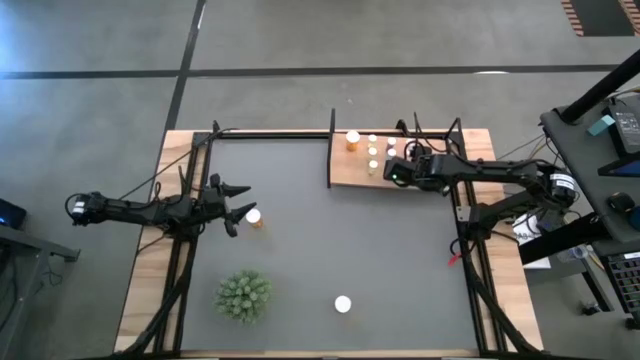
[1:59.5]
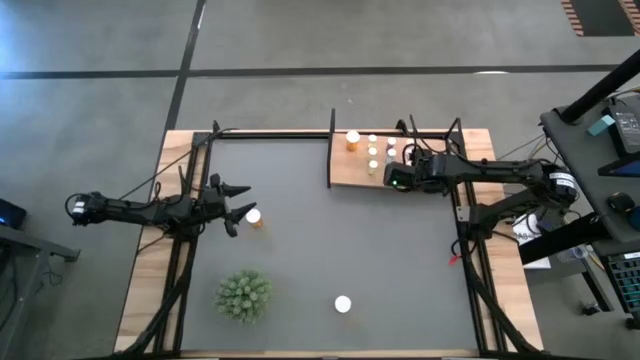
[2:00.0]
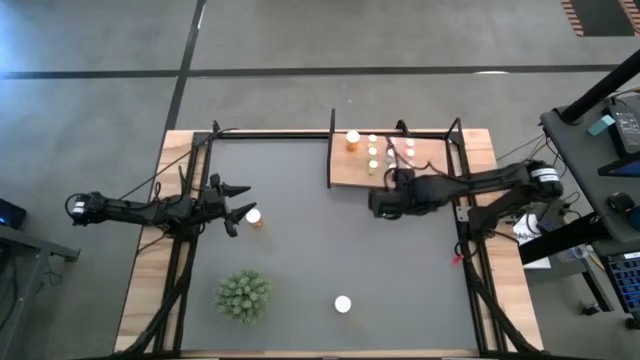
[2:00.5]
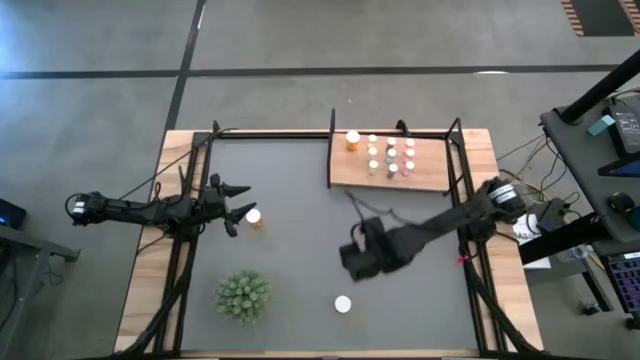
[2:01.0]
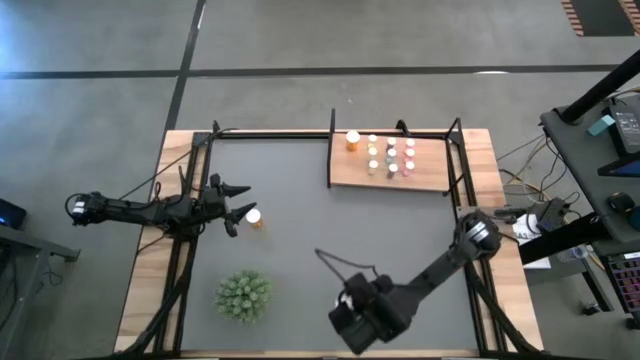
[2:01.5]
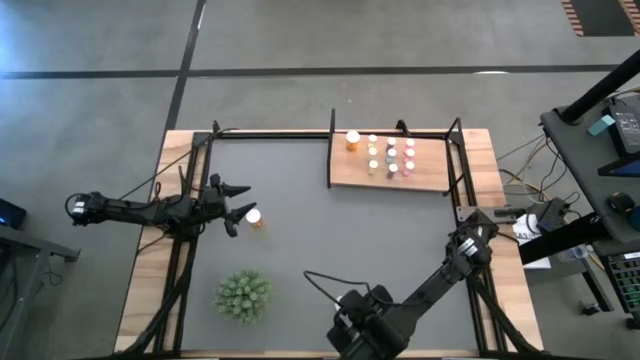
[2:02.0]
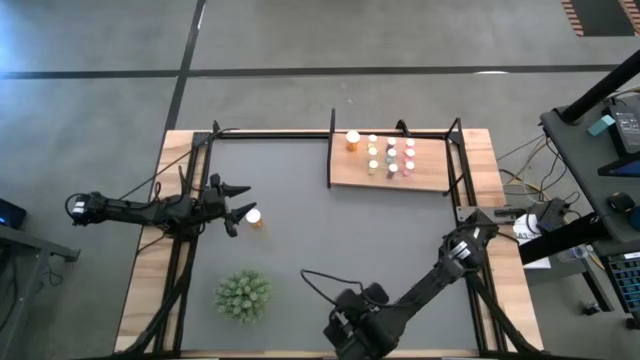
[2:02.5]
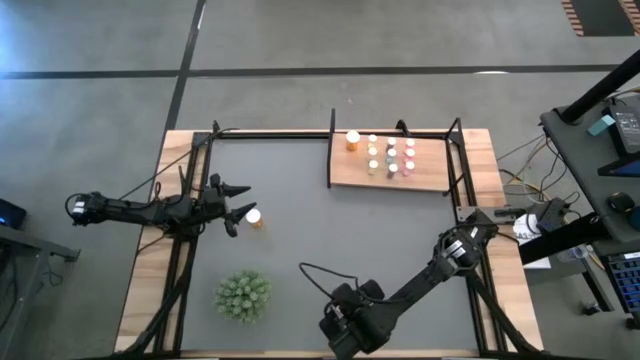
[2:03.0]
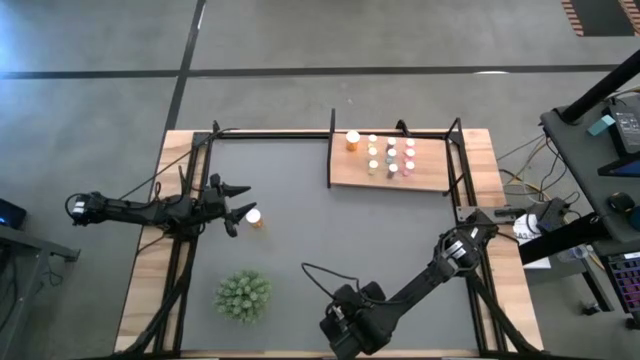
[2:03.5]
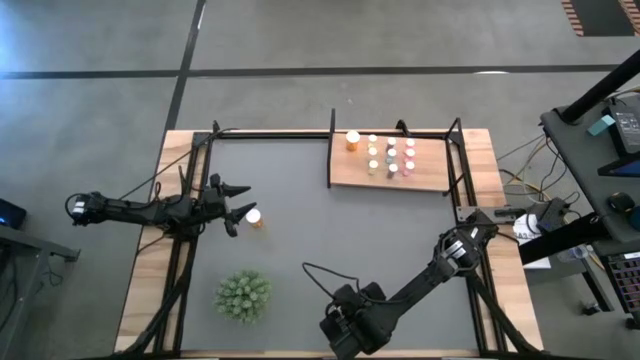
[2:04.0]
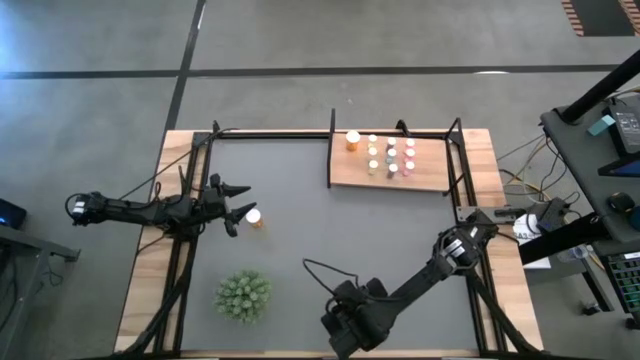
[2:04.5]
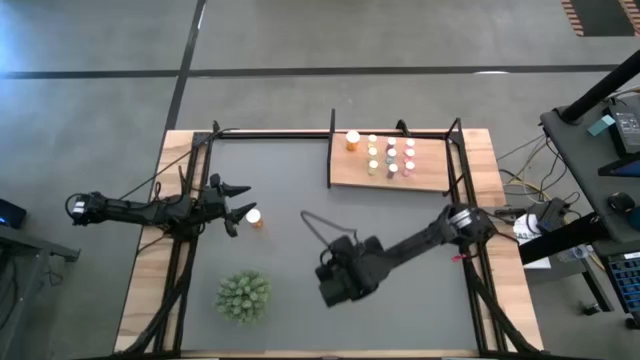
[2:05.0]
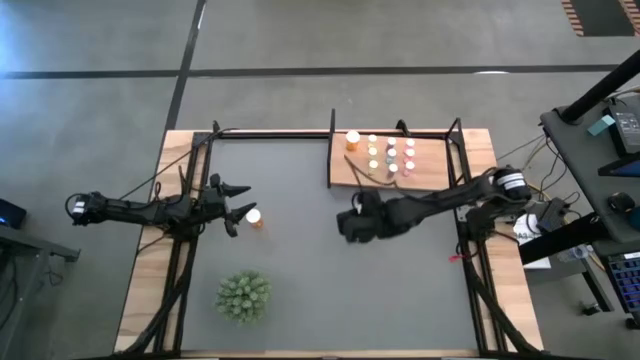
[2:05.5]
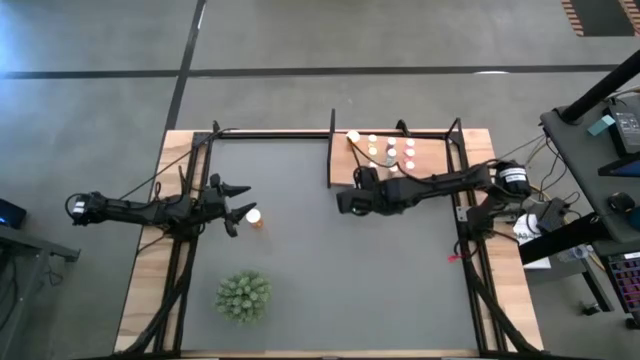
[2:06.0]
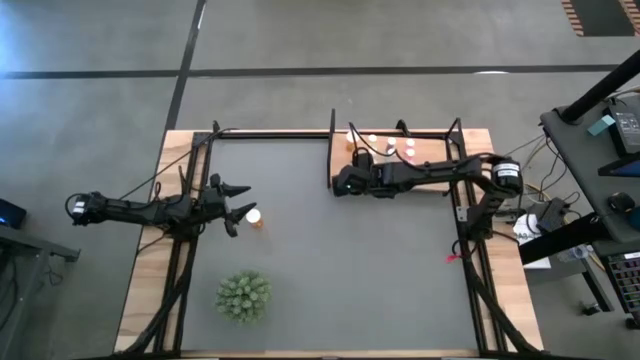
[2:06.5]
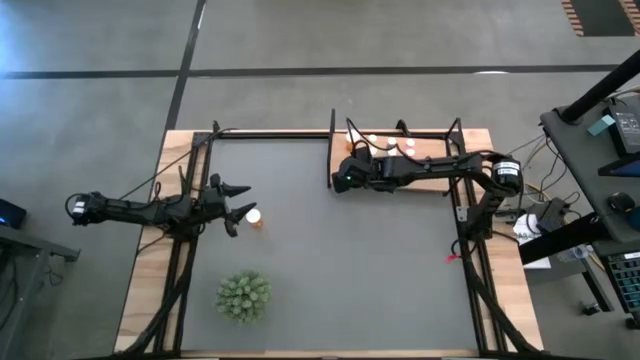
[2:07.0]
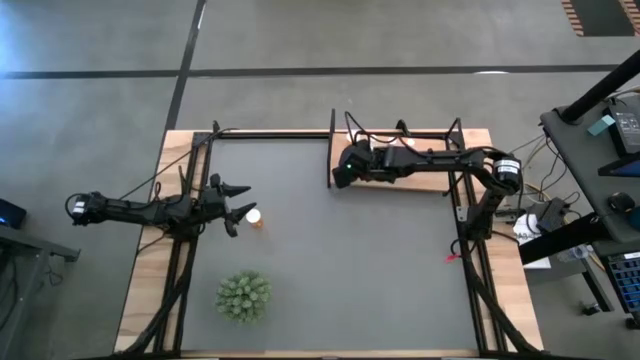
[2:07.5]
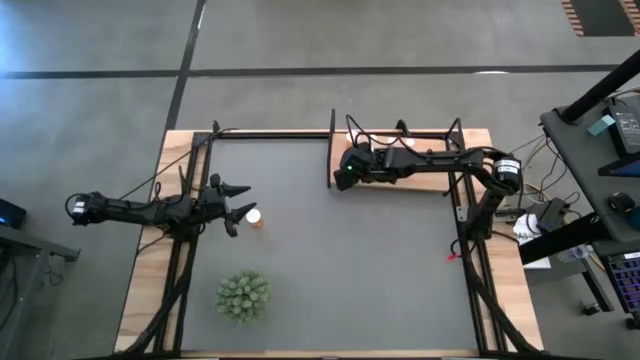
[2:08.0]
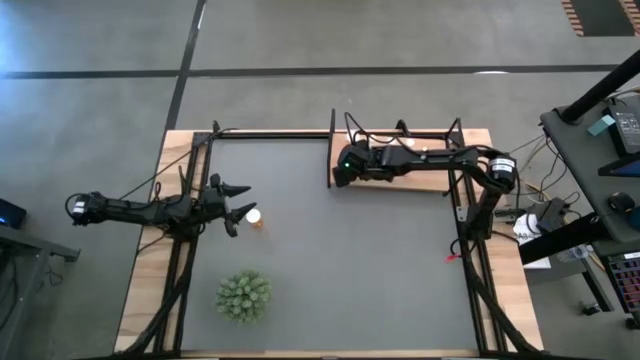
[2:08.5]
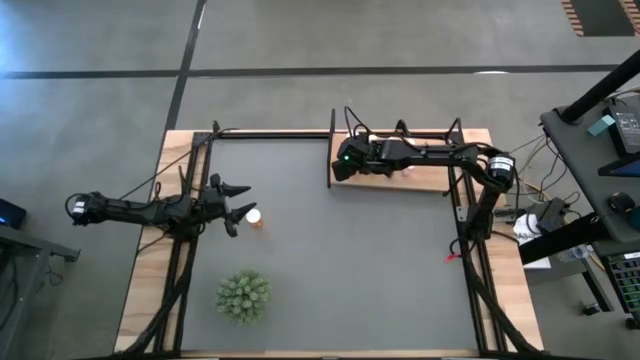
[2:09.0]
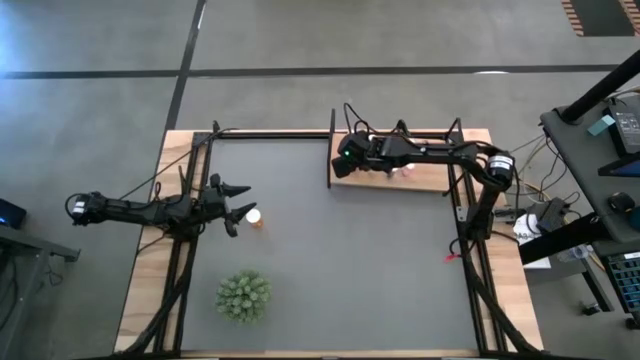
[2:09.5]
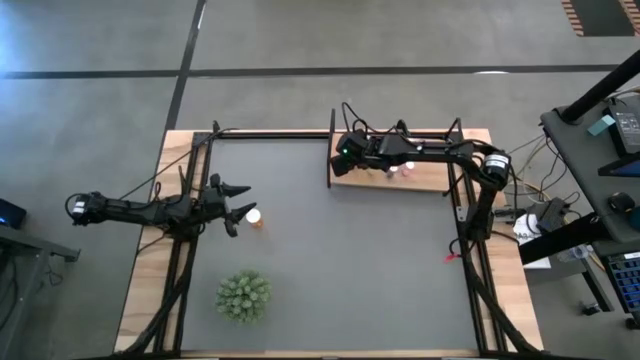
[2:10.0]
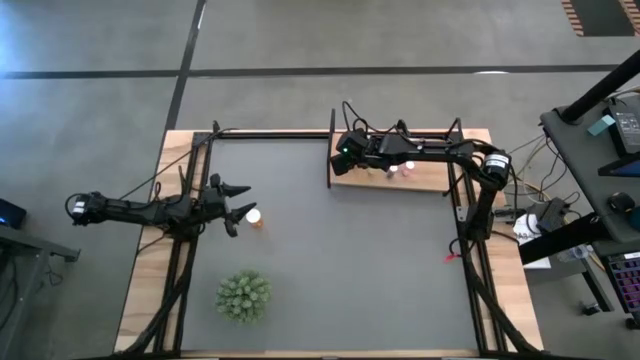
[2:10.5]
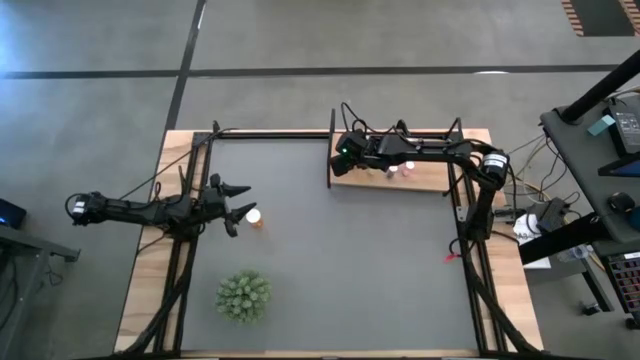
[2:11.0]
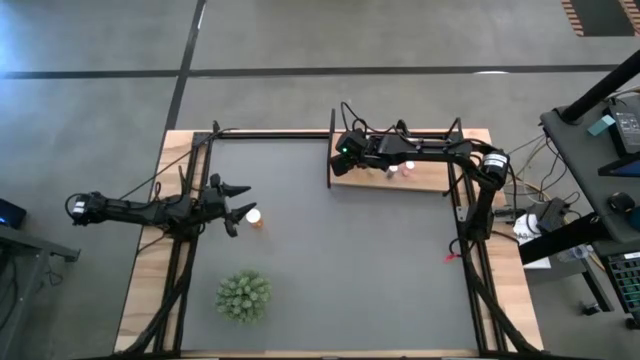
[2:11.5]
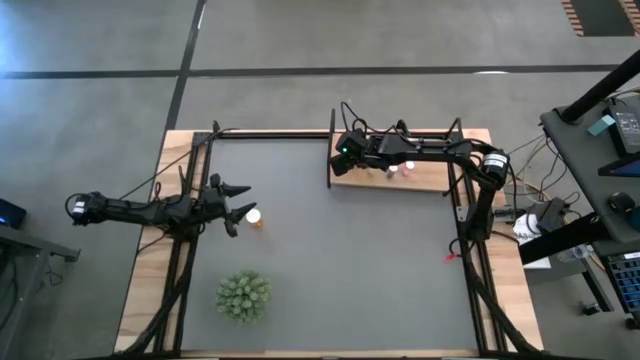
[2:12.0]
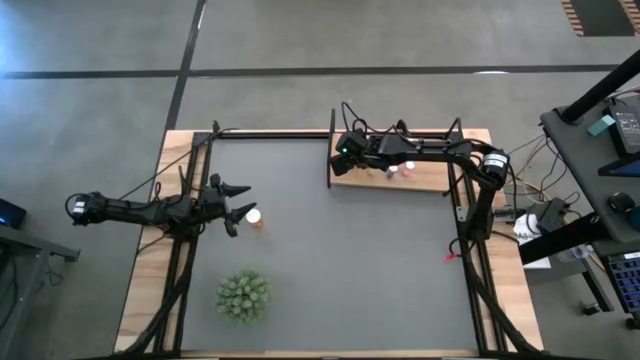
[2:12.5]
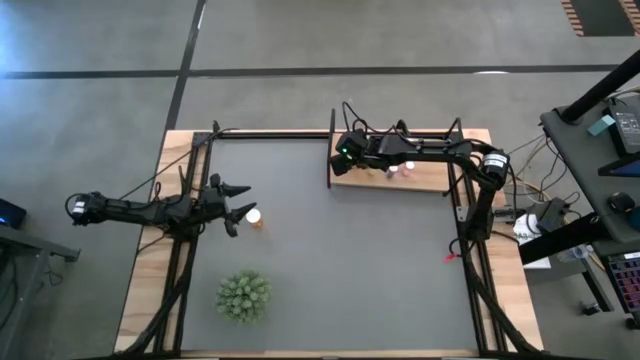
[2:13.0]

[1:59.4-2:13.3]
Task: Pick and place medicine bottles onto shelf by color
Put the bottom orange pill bottle on the shelf aligned with the other orange pill bottle

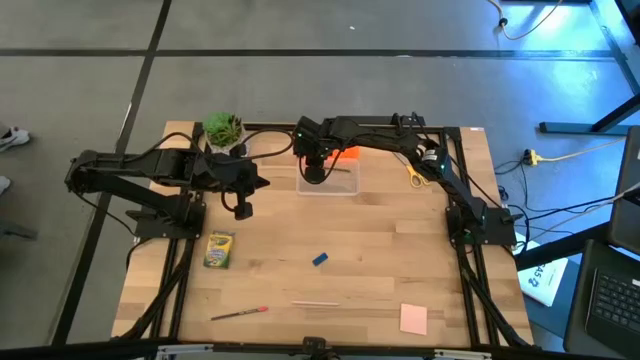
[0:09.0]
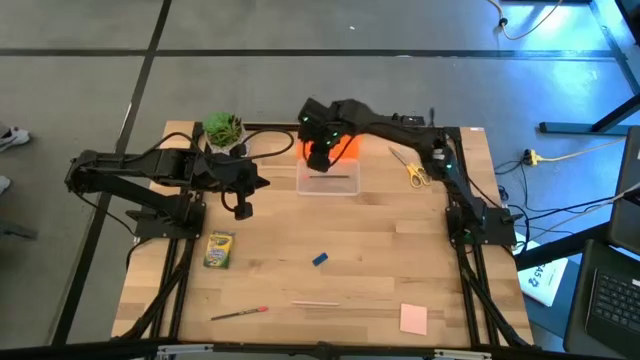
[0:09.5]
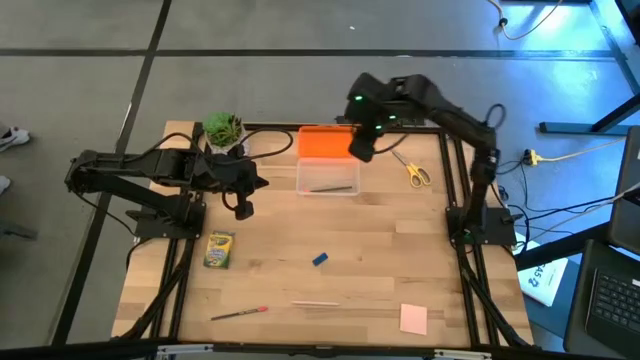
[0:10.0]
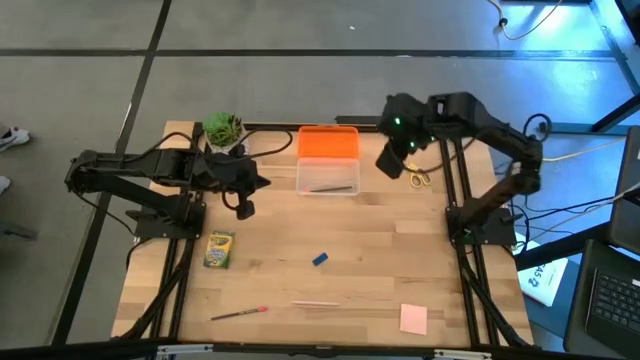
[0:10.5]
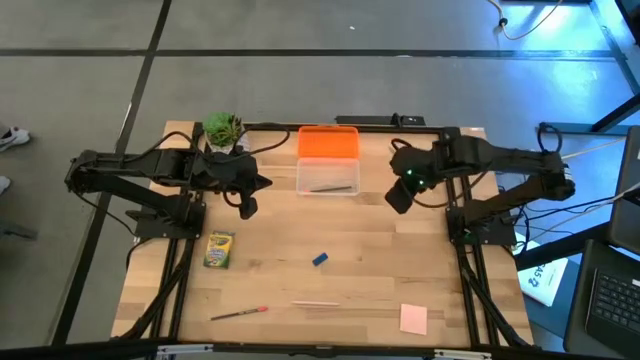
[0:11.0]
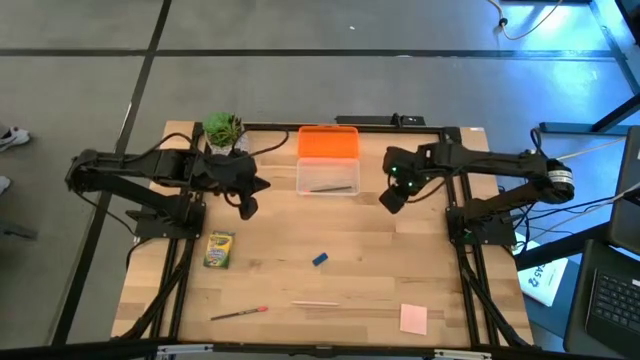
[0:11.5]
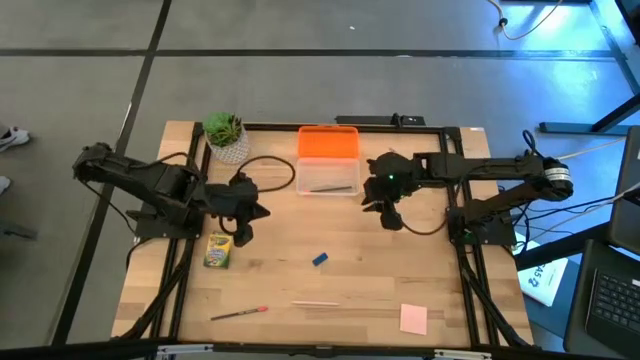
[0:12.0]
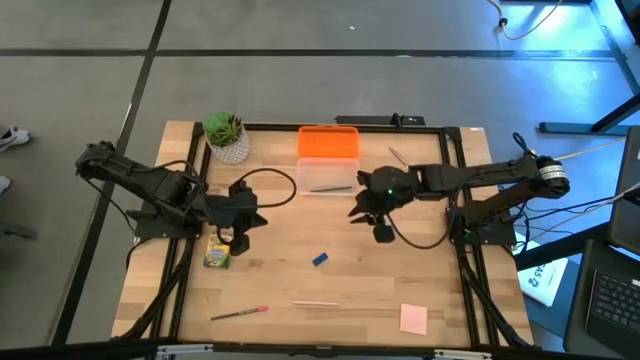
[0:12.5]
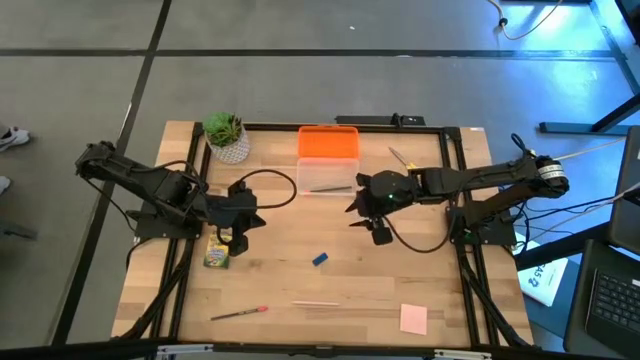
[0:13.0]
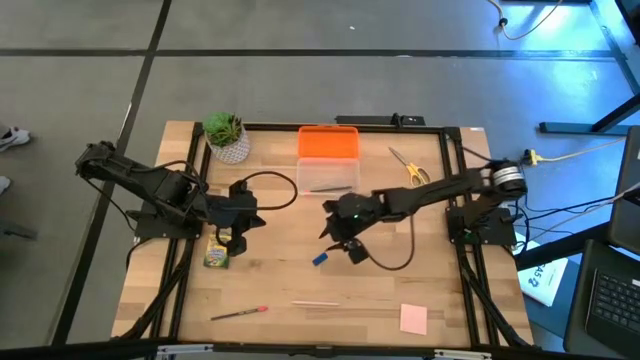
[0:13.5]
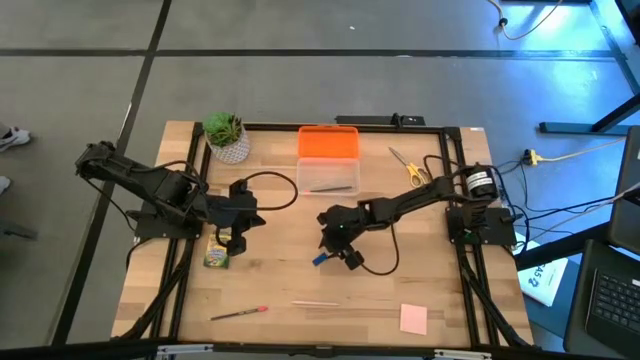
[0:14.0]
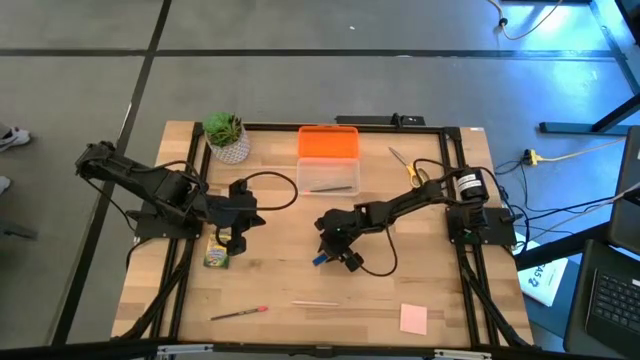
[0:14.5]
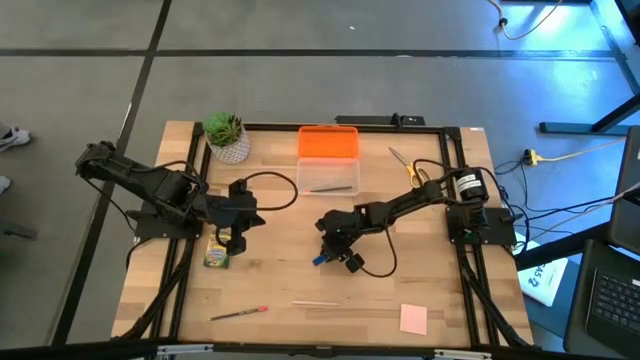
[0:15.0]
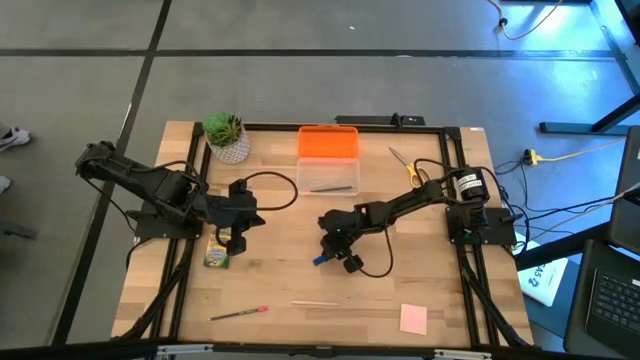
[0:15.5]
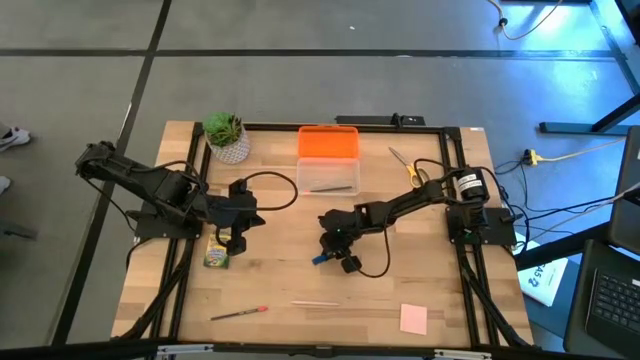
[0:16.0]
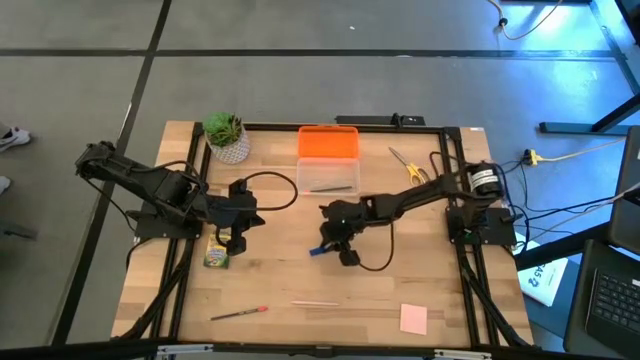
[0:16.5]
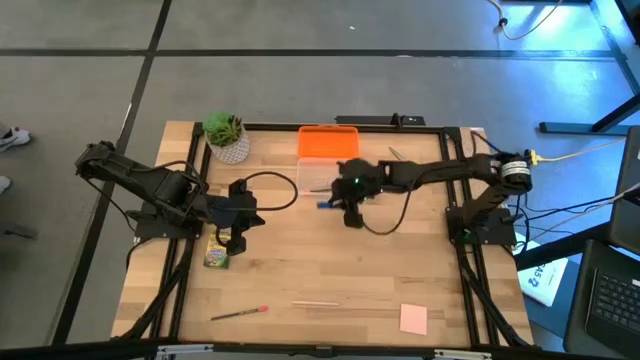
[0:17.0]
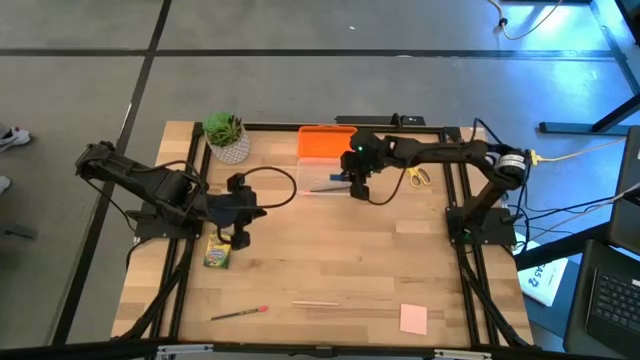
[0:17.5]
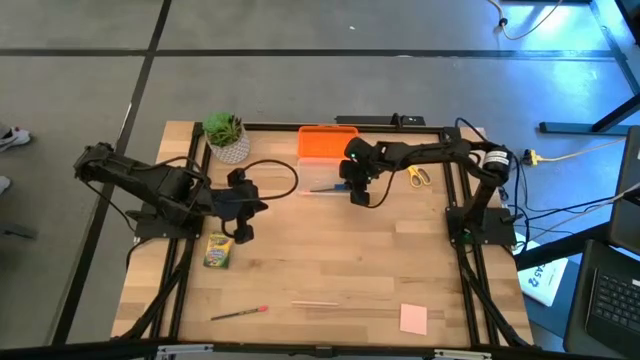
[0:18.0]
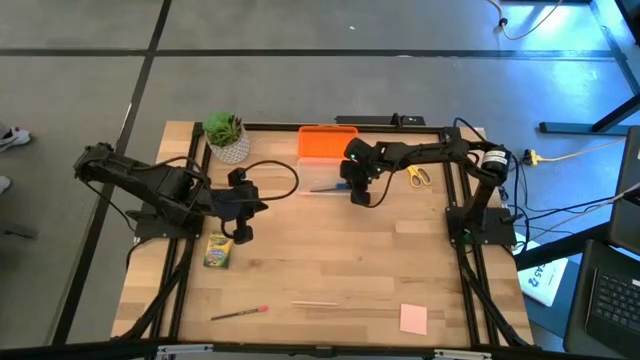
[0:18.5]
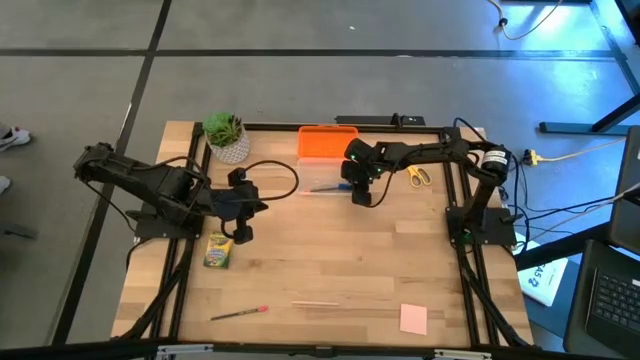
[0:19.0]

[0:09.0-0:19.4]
Task: Pack school essentials
Put the blue eraser into the orange supply box
